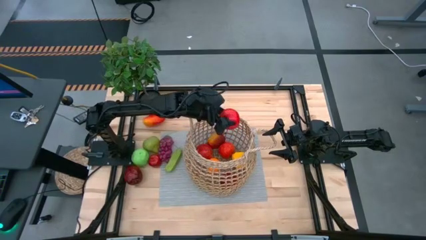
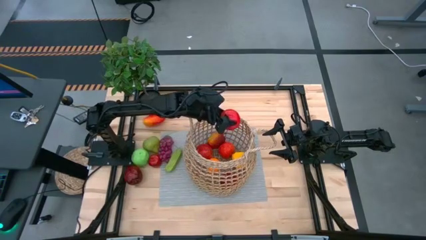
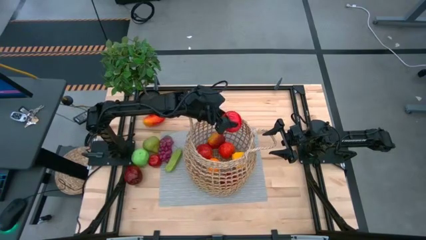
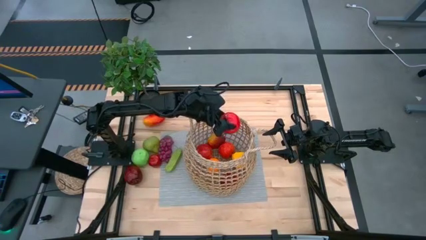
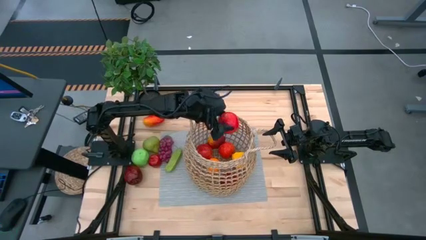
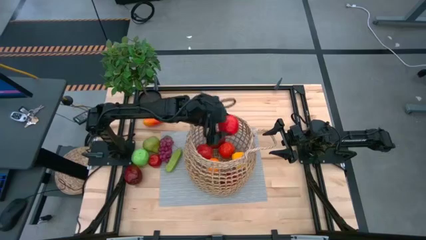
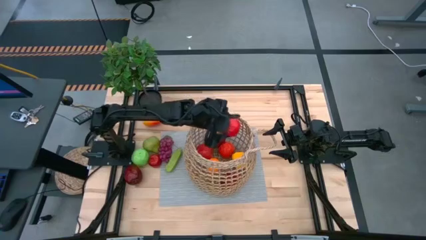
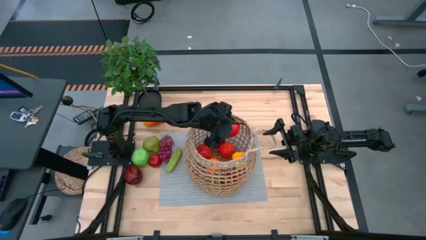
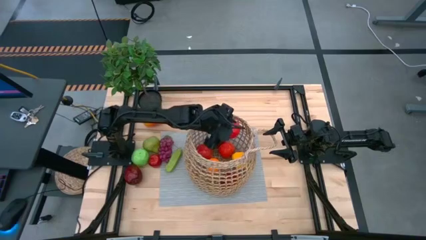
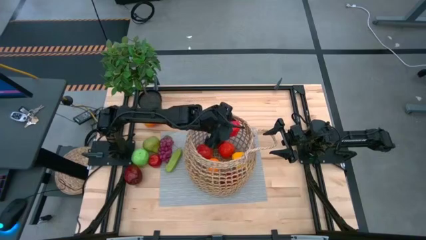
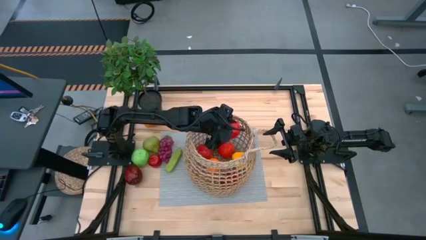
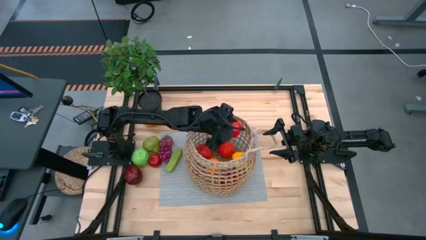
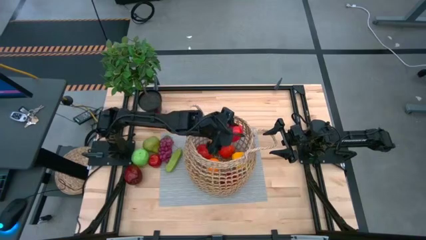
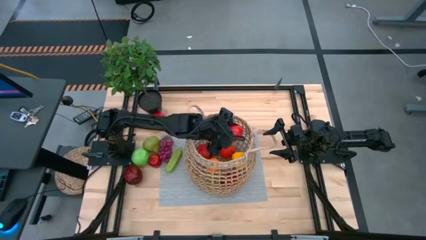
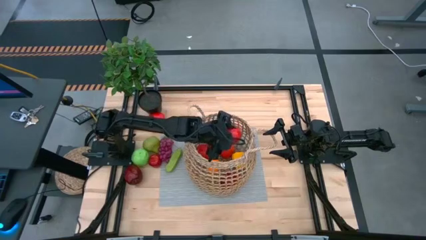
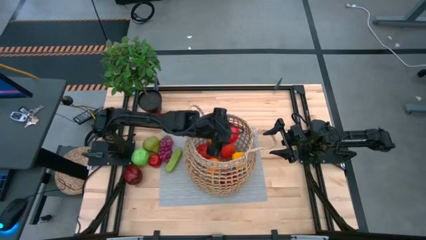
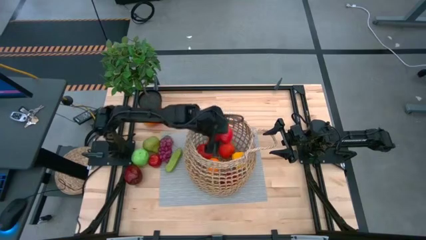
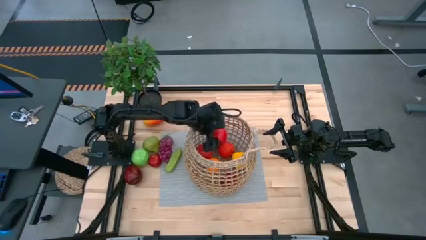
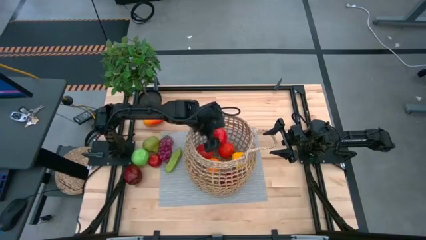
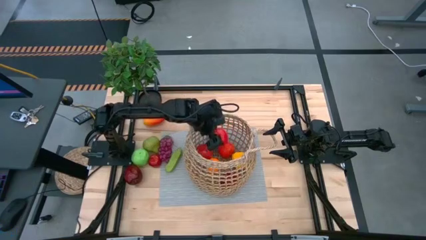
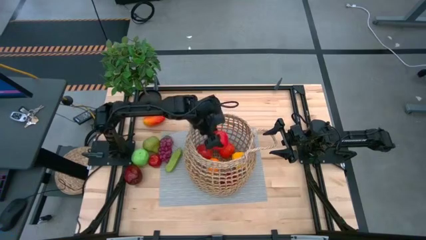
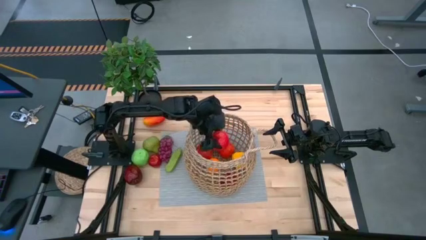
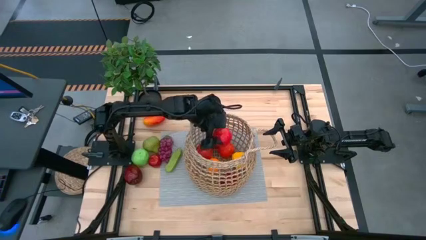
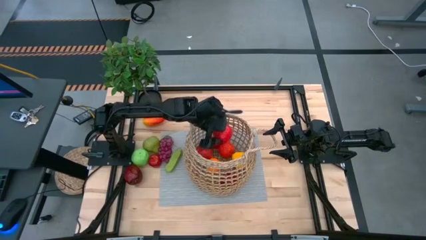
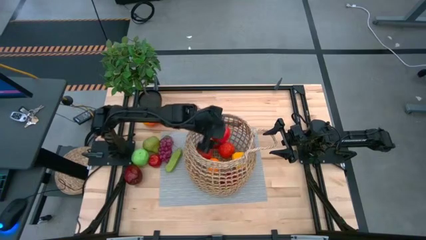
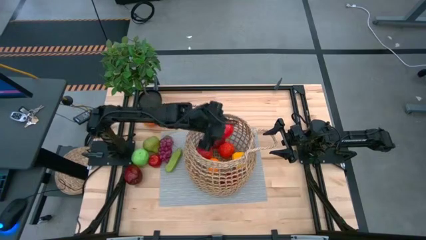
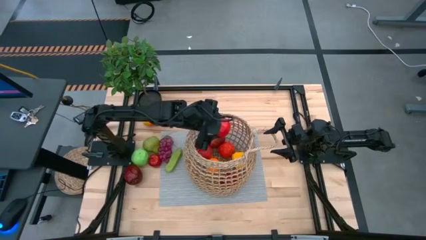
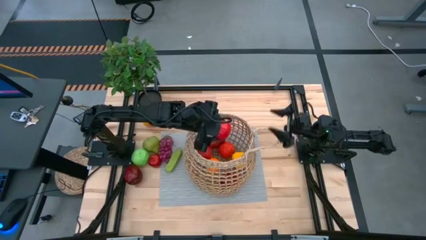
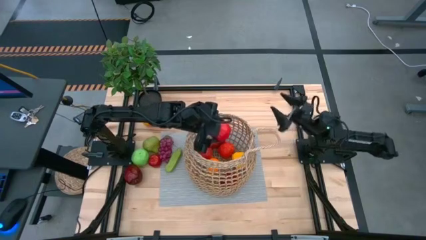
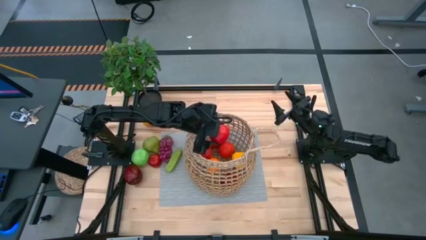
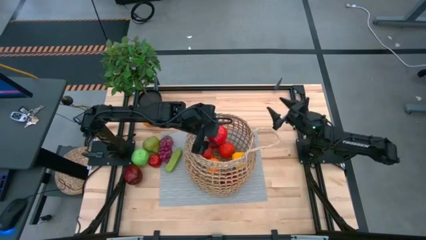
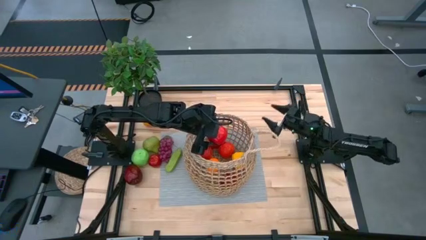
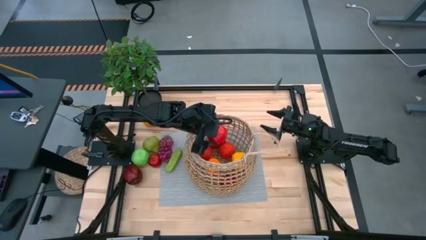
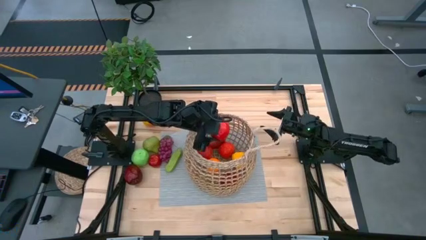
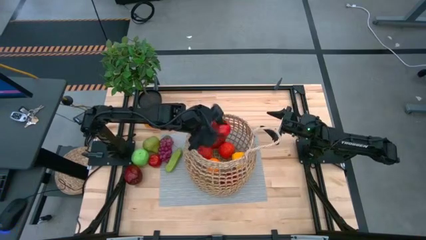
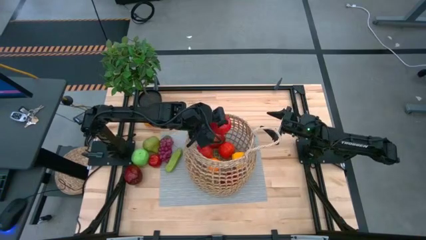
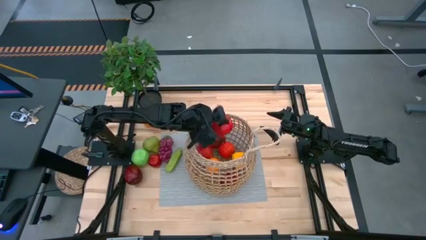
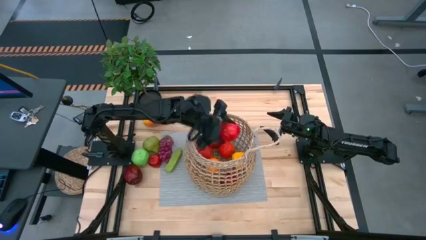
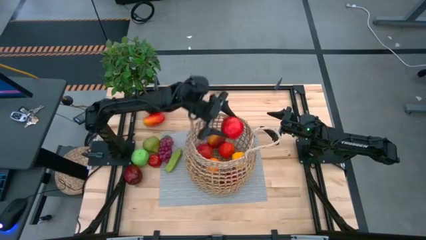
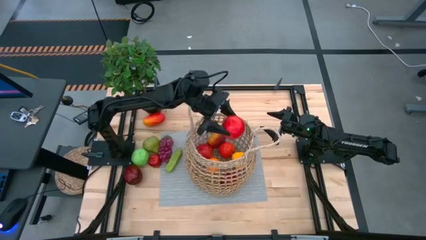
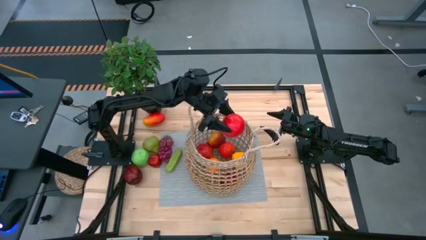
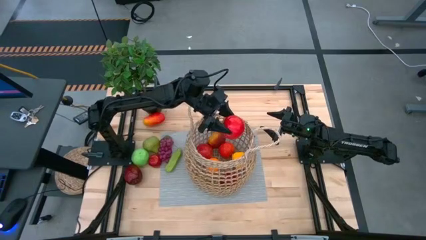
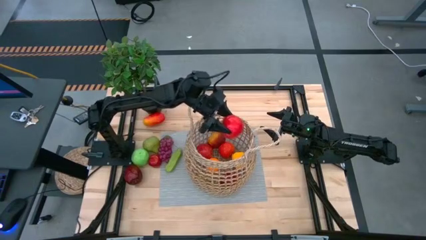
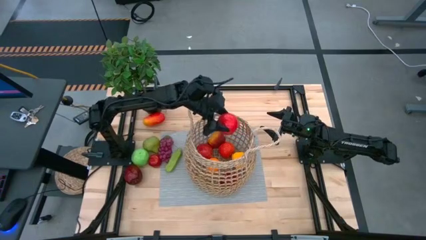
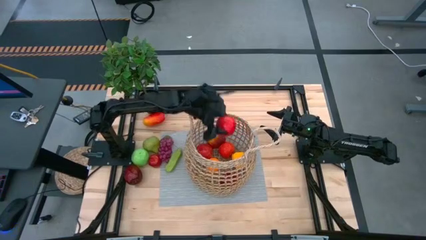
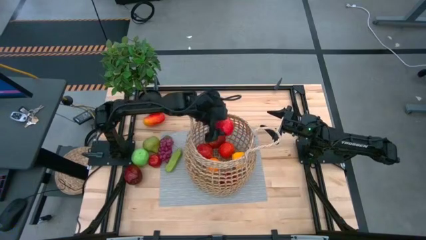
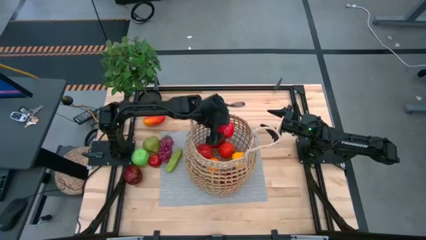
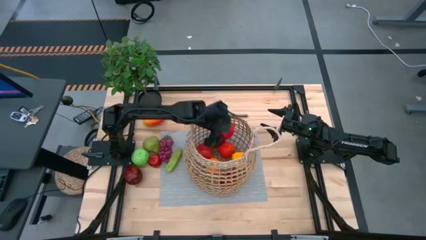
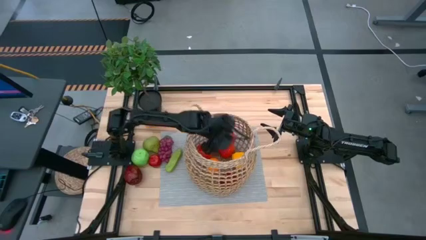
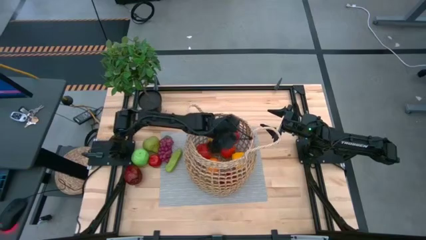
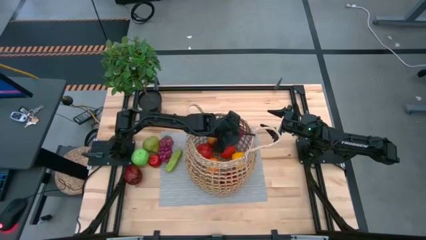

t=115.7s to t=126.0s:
Task: Build produce basket
Put the red apple into the brown basket

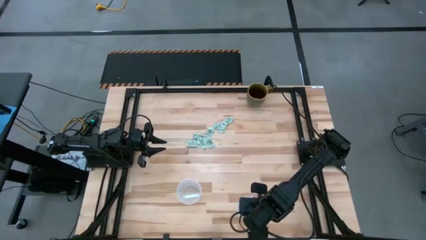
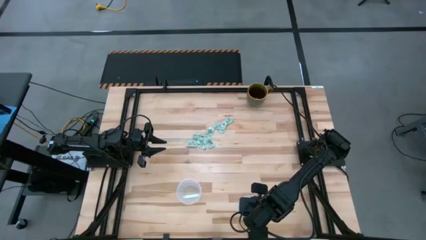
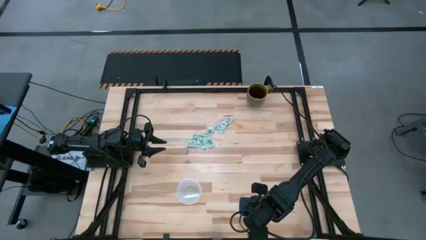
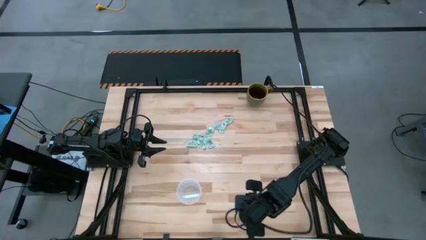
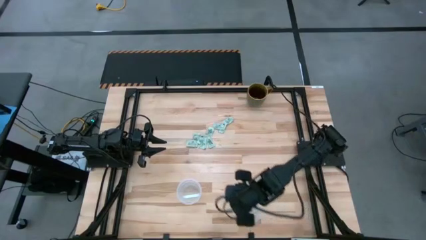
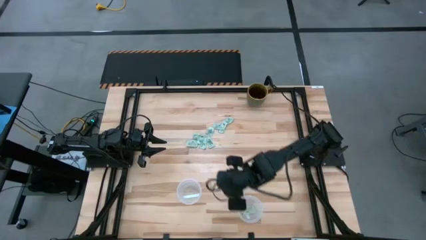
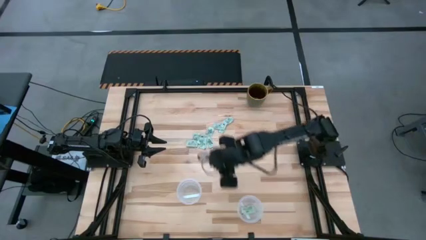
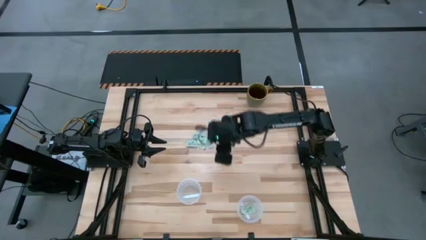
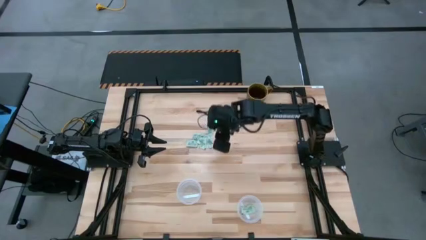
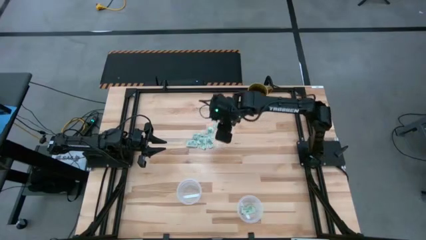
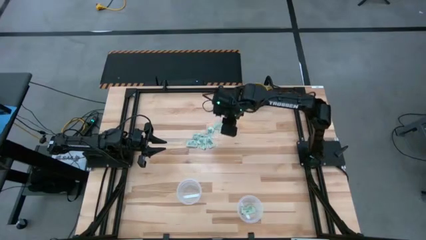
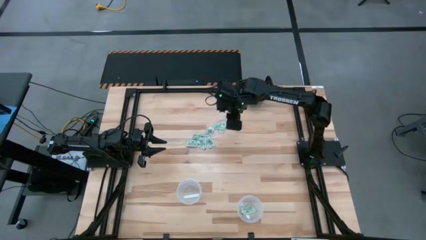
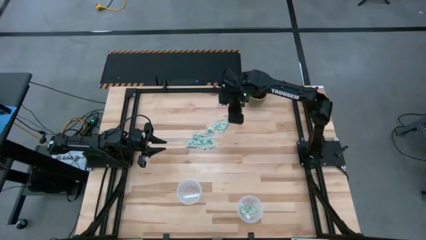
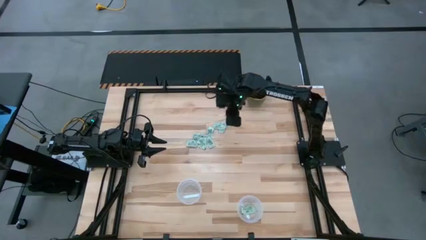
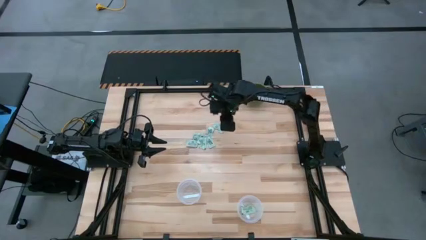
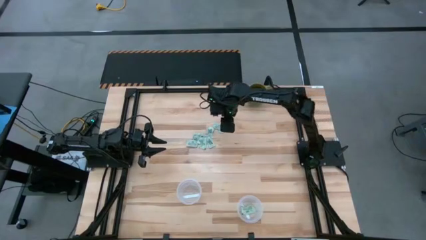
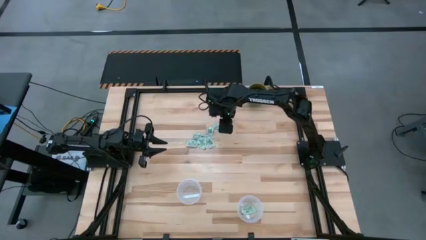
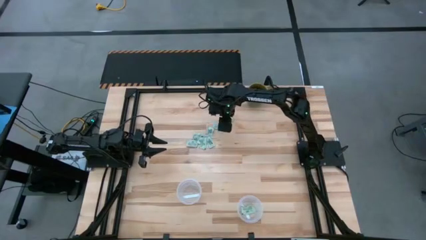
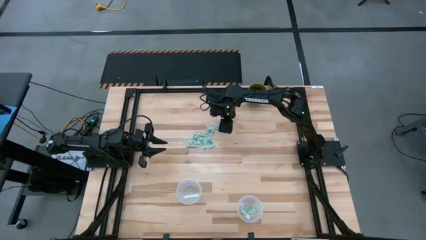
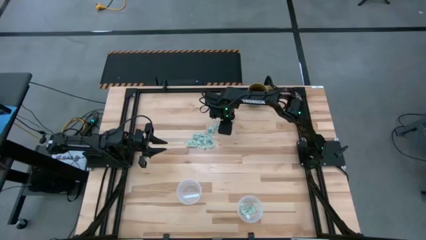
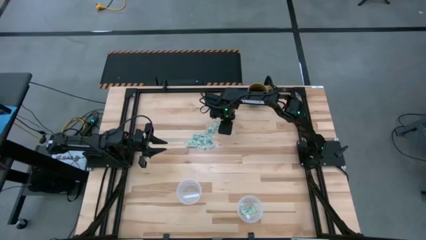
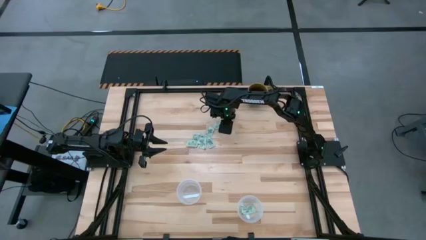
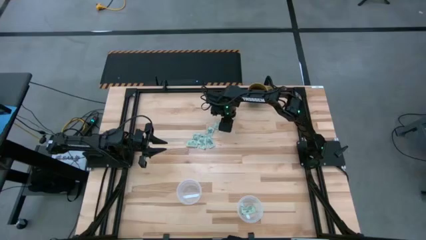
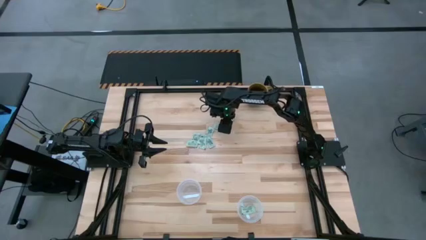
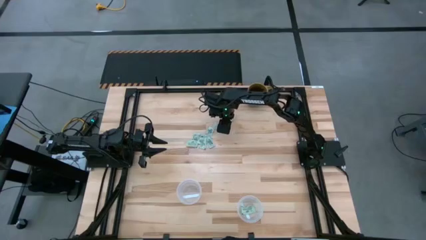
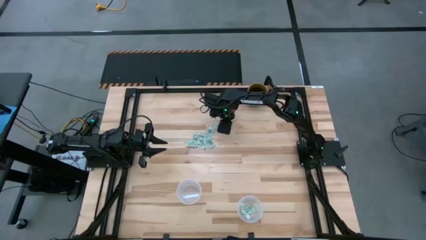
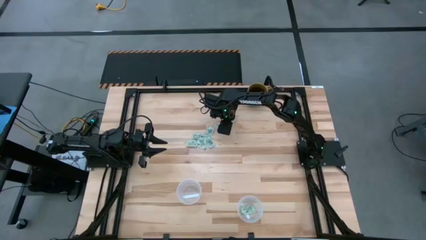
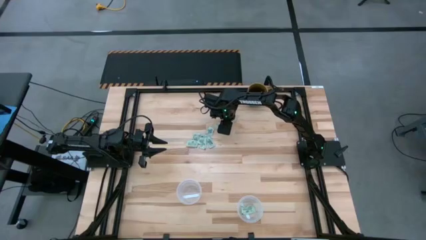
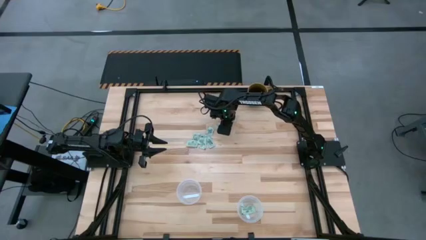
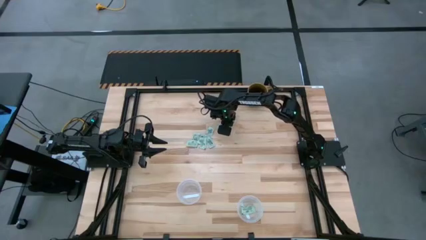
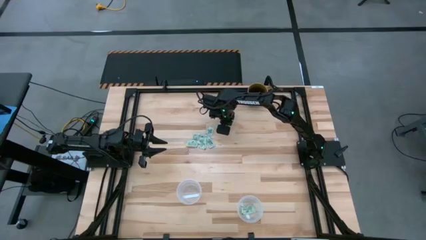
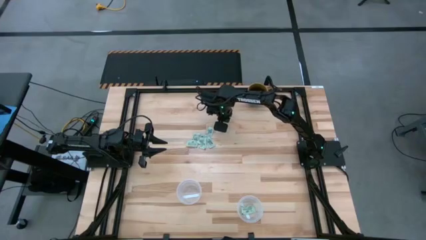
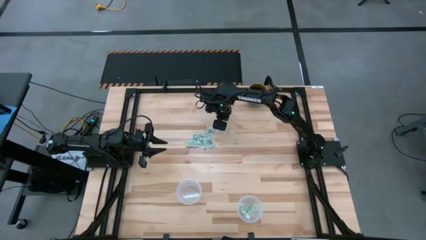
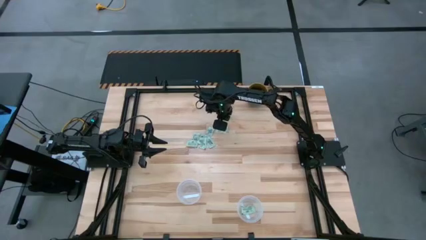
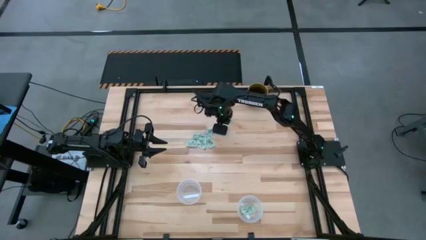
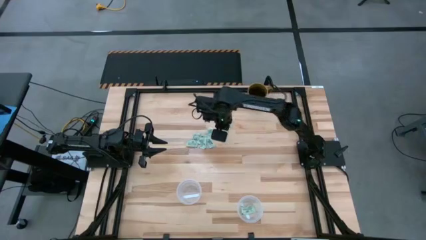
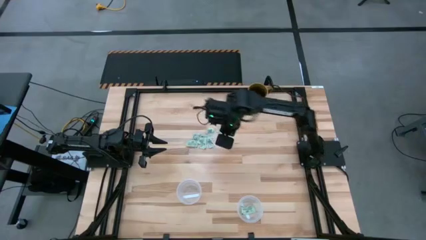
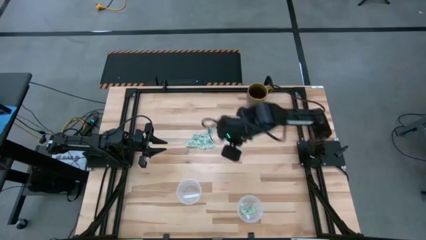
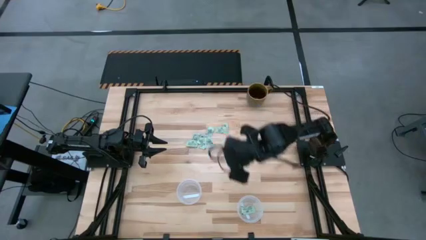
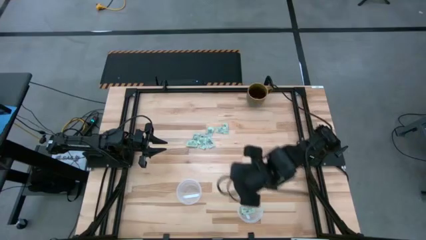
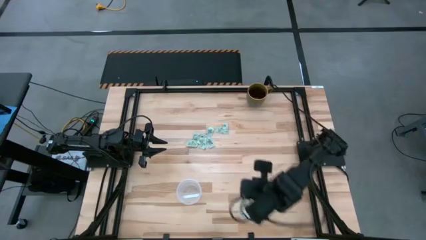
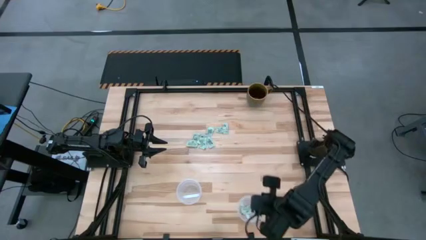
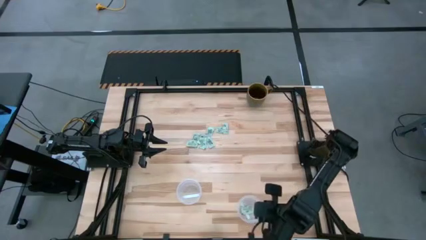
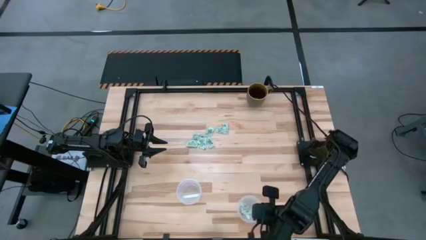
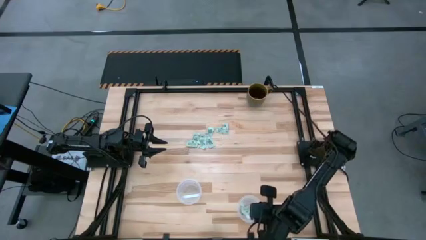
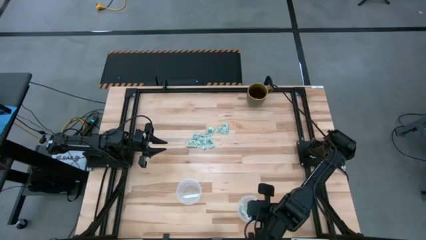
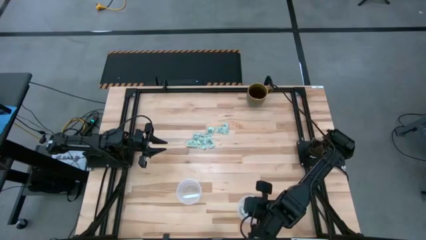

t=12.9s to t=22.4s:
Task: Pick and place items into bin
Put the stevia packet into the right transparent bin
